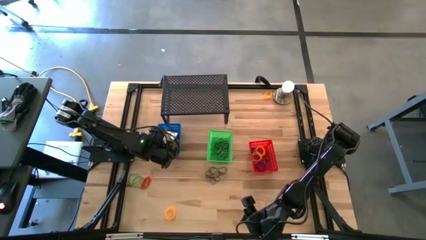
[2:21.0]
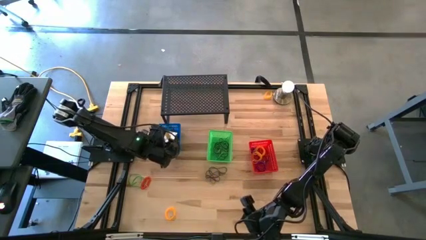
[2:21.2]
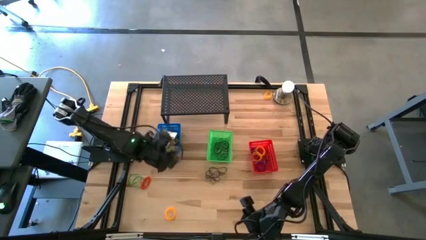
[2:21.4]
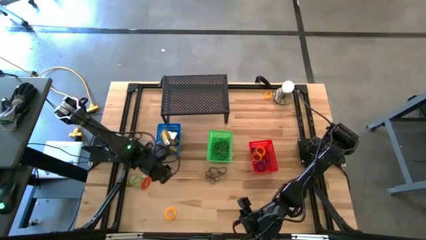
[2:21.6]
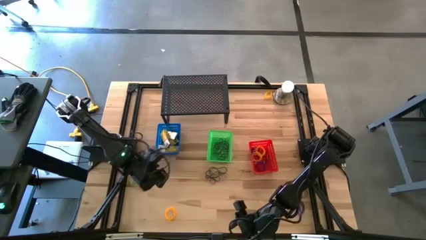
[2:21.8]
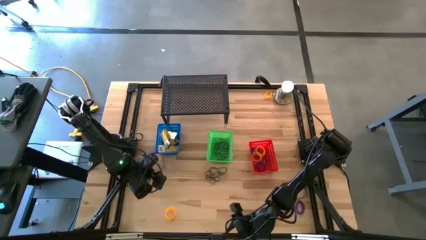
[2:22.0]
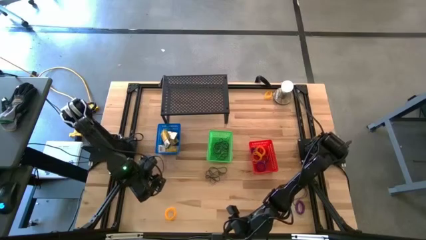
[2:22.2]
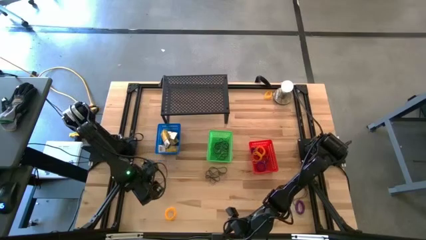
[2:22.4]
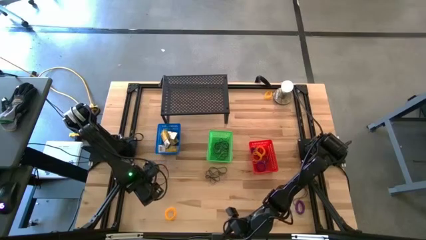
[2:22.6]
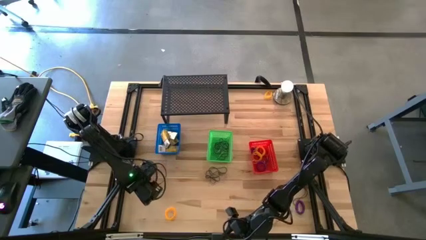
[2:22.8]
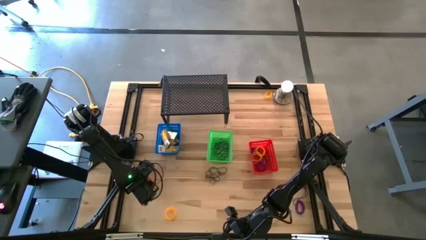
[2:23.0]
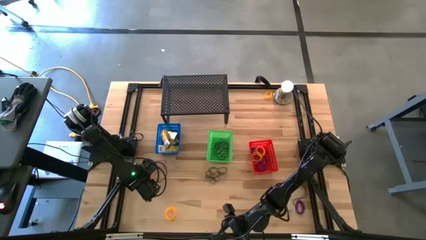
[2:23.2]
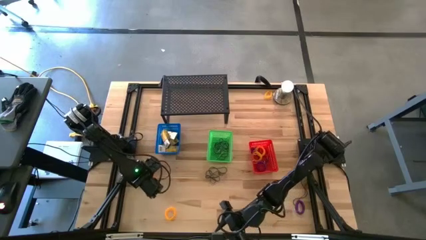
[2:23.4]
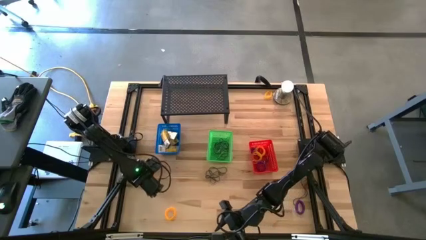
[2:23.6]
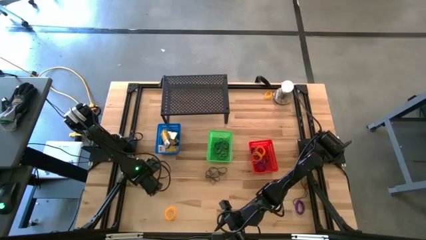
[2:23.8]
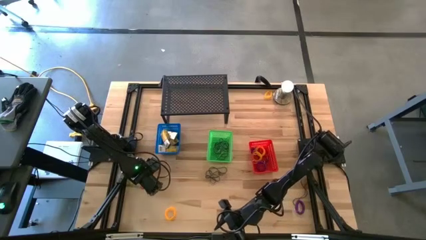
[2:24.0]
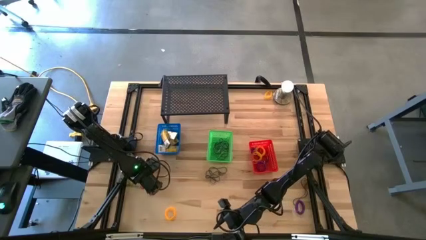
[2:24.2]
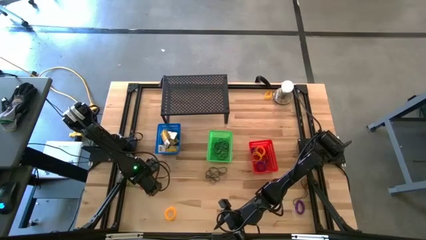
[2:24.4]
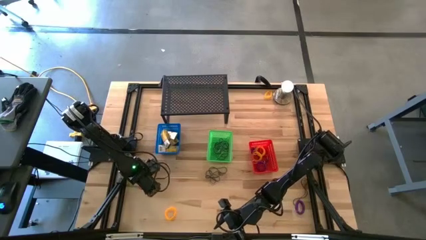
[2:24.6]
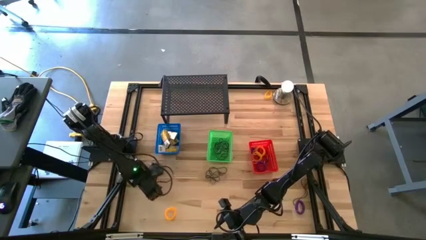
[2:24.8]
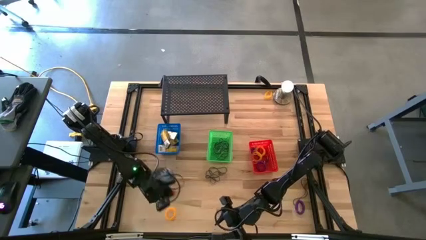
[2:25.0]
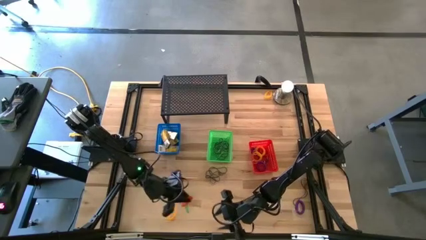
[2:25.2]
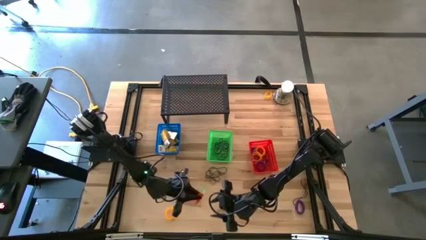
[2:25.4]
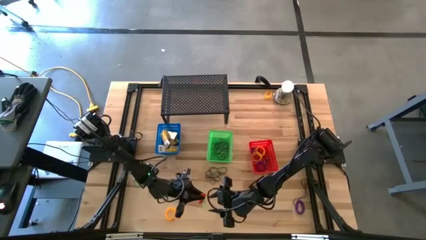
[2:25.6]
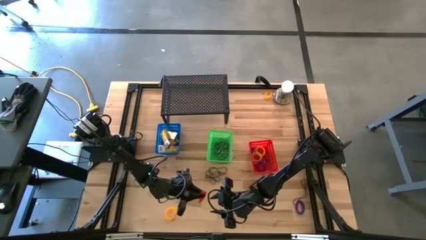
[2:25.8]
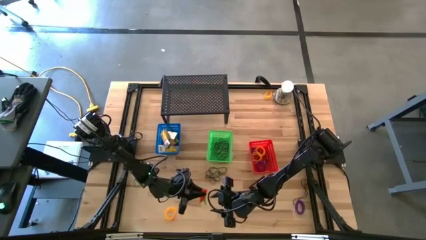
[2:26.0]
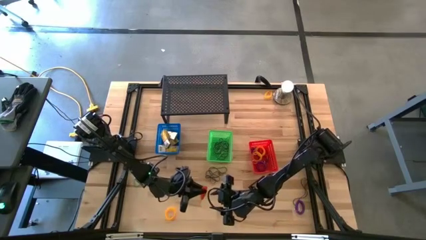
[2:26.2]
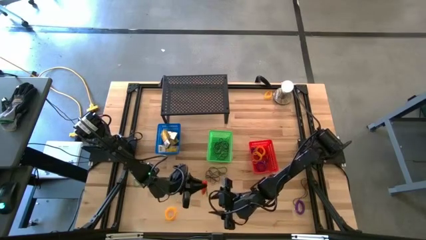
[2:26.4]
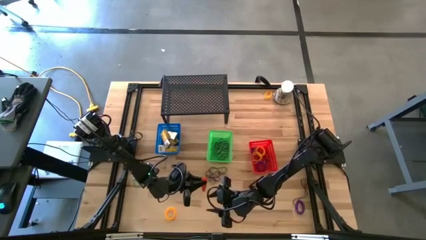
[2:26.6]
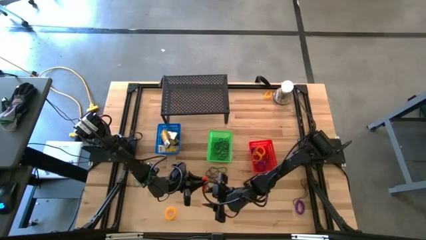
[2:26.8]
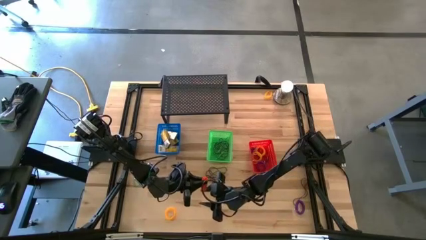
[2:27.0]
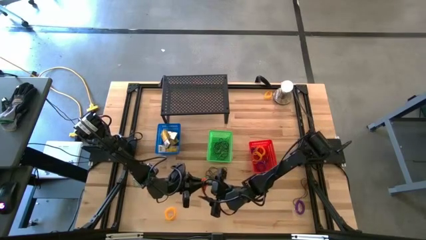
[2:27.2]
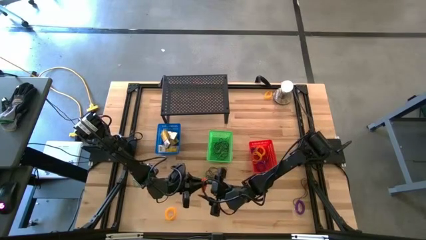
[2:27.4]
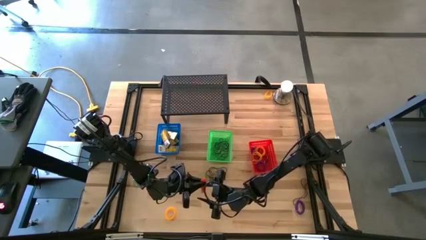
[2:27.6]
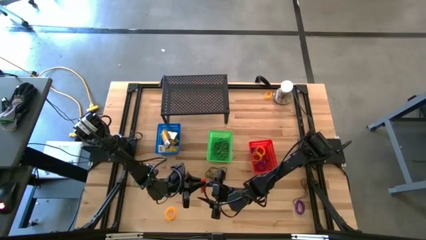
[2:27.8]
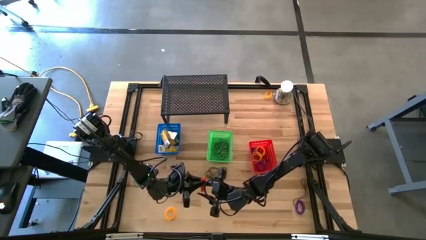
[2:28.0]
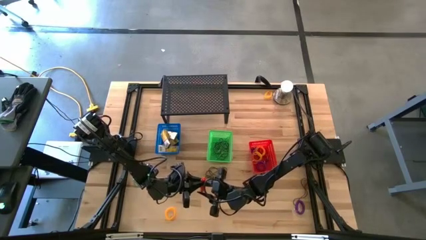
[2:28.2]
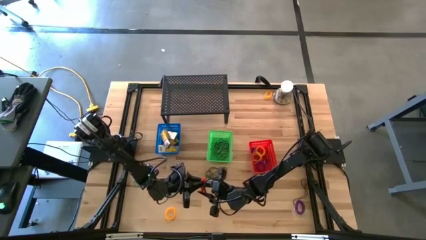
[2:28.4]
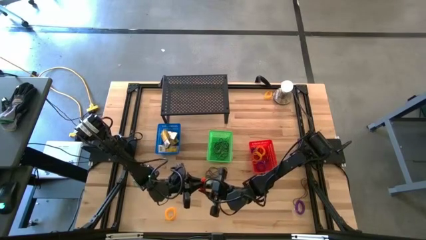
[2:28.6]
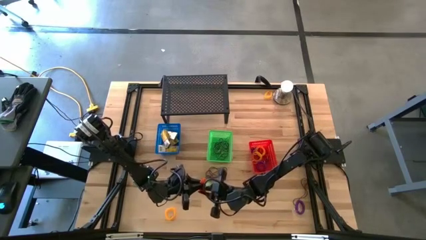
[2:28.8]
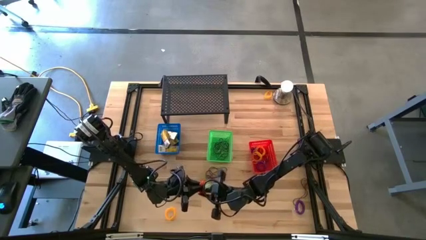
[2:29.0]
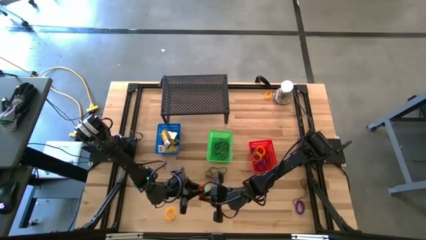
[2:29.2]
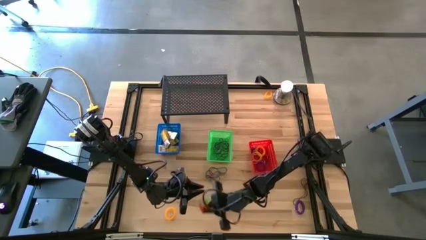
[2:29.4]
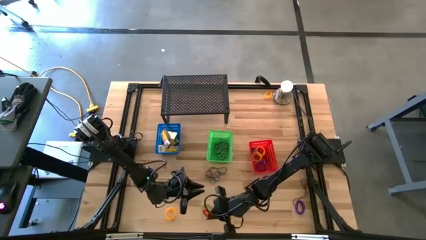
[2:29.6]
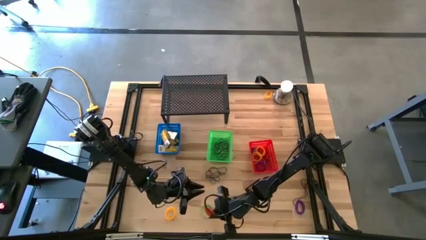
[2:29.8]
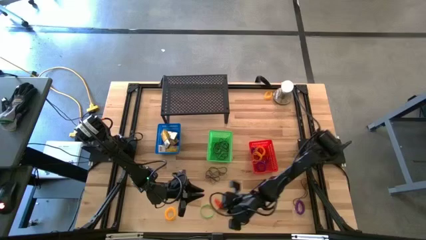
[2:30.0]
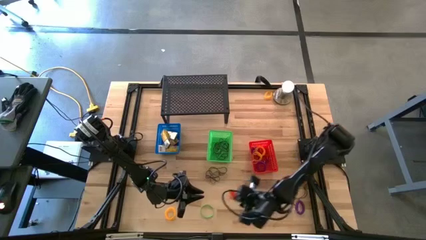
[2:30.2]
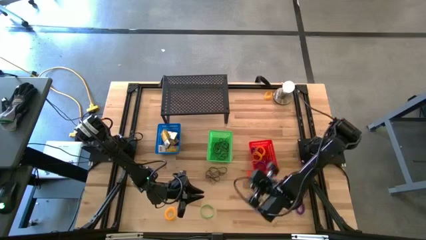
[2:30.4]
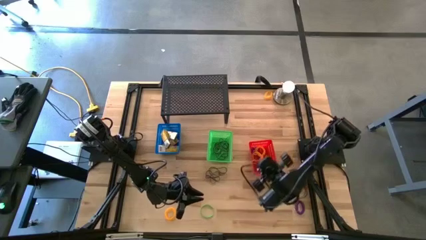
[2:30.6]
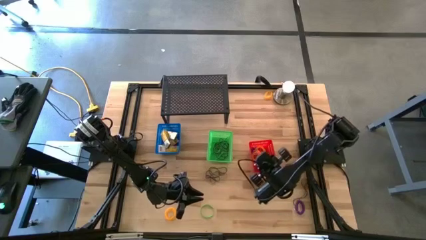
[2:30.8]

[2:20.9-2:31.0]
Task: Pick & Place Office Desk Supplies
Put the orange spring keychain into the red bin

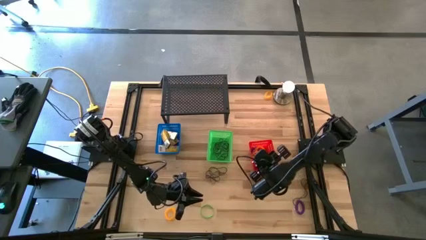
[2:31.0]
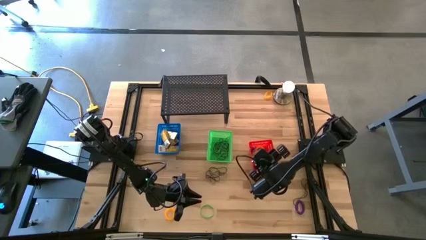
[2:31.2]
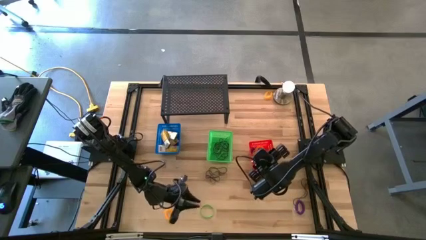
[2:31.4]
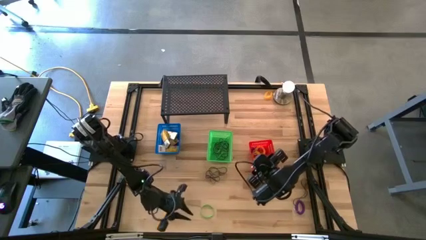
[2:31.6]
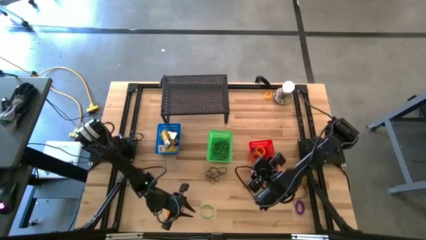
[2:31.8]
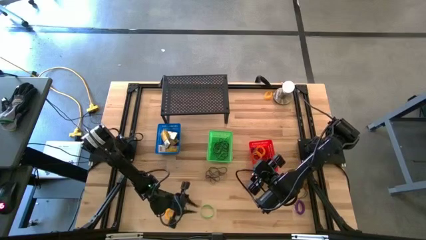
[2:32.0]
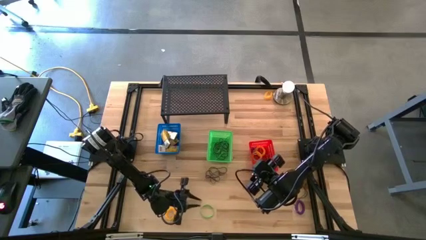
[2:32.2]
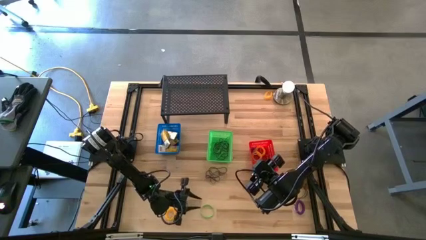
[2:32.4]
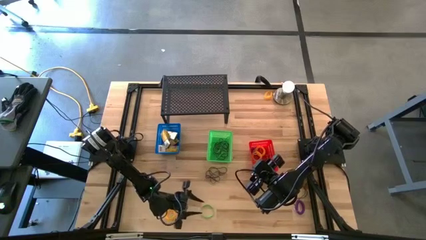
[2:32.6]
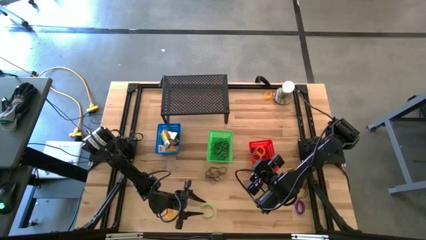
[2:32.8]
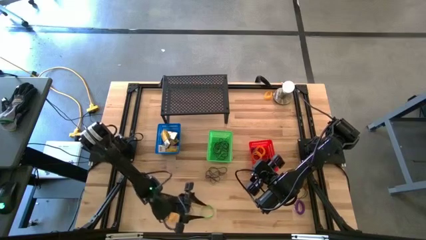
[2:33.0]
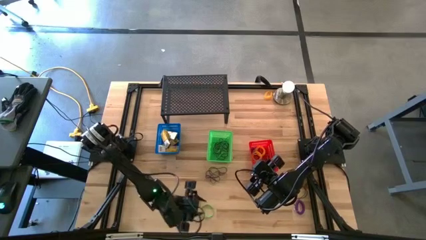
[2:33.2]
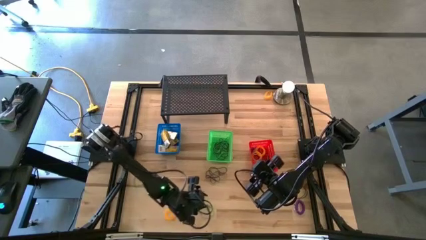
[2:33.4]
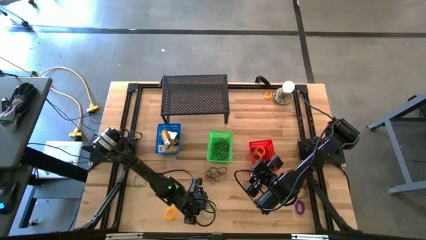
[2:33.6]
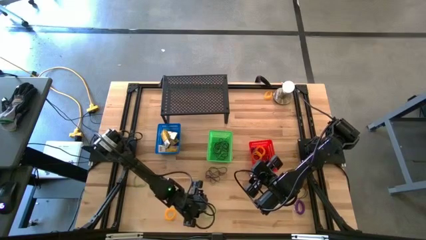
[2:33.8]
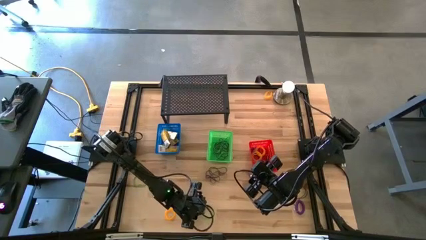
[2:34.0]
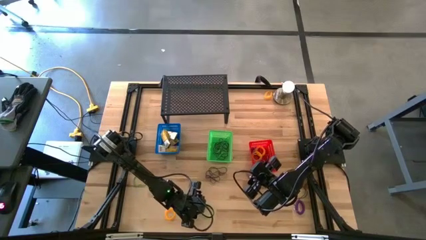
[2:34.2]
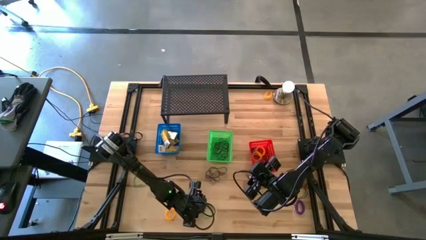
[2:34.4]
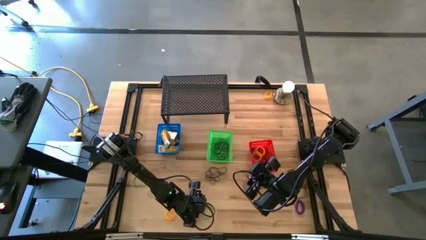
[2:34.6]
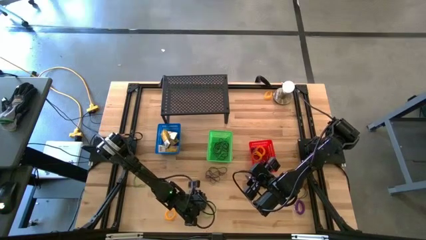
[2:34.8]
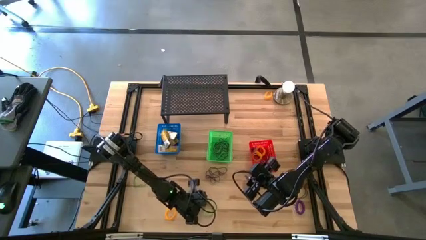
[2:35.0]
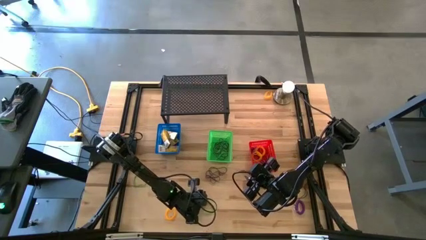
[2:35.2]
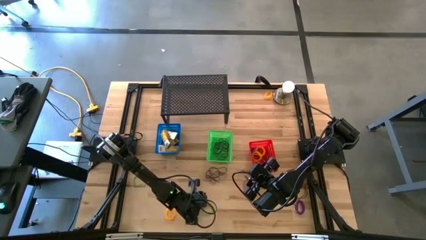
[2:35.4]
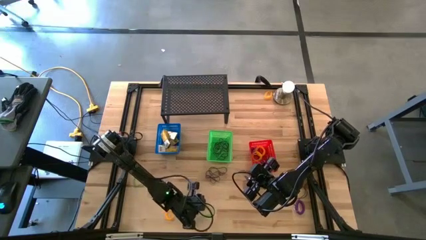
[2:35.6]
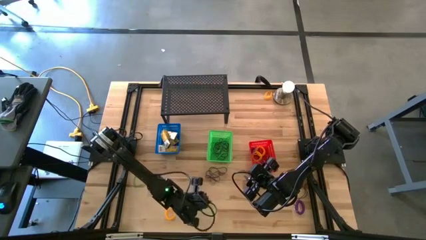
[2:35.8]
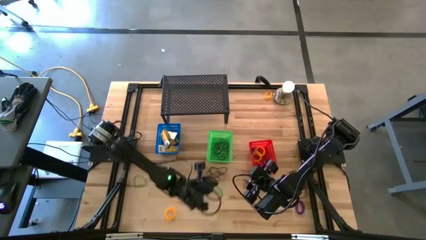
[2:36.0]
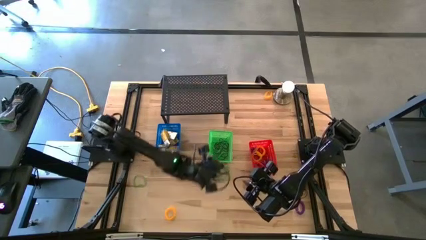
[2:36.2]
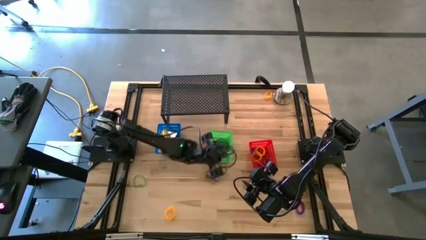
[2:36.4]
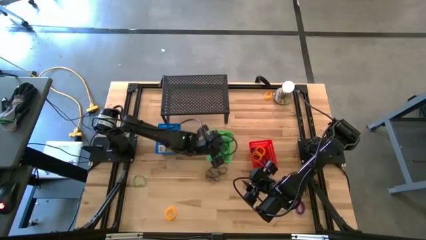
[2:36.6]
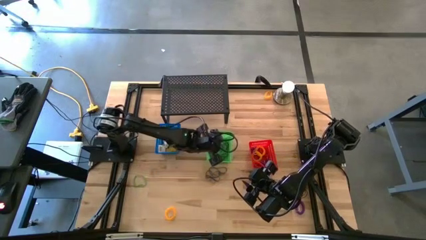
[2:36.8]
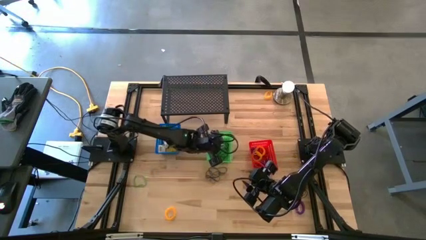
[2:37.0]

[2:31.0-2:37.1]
Put the green rubber band into the green bin
